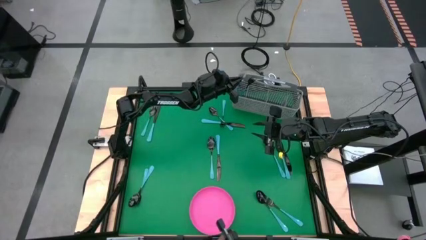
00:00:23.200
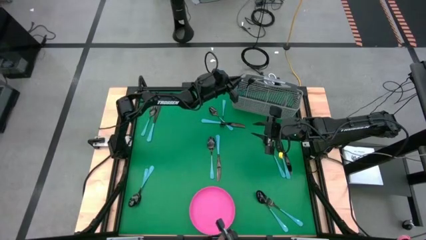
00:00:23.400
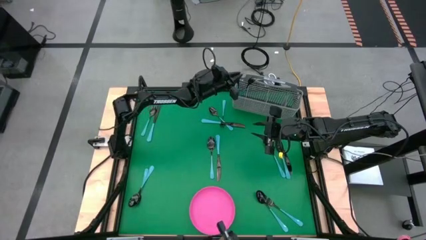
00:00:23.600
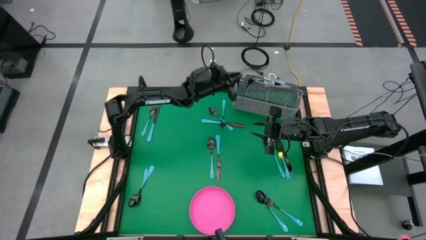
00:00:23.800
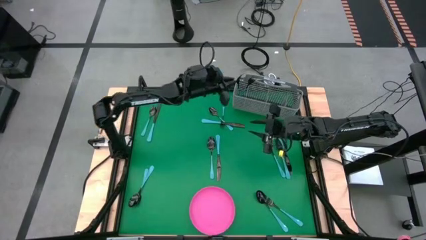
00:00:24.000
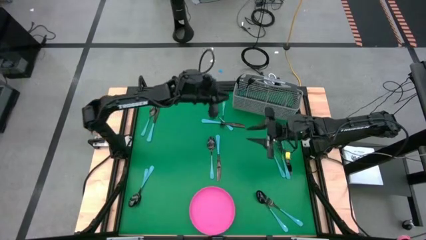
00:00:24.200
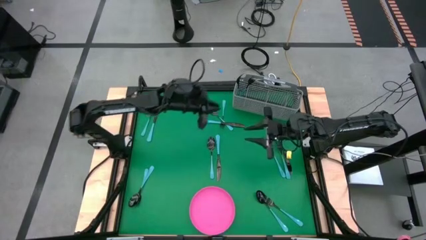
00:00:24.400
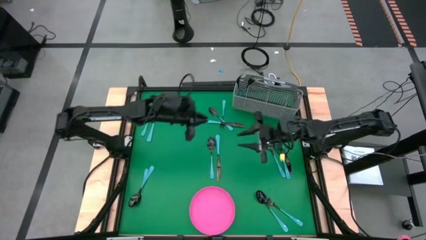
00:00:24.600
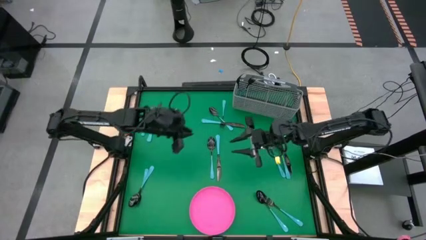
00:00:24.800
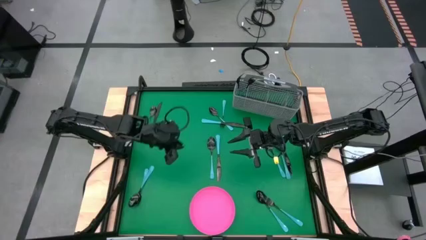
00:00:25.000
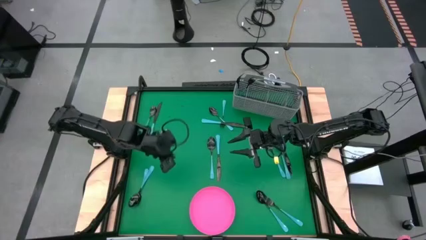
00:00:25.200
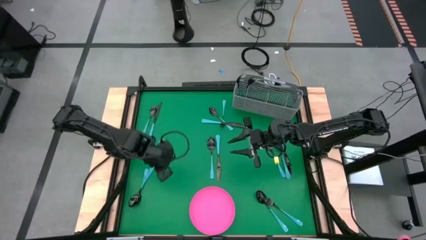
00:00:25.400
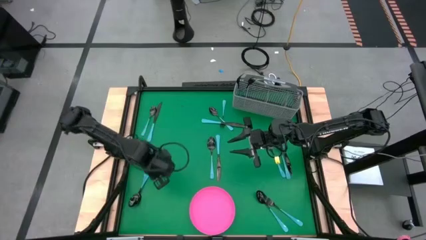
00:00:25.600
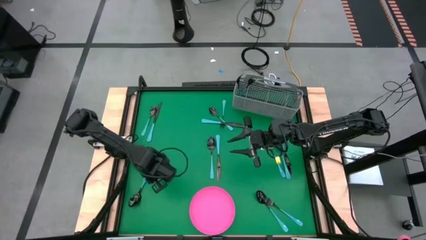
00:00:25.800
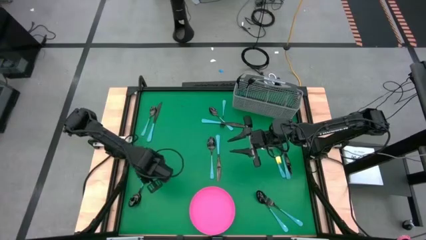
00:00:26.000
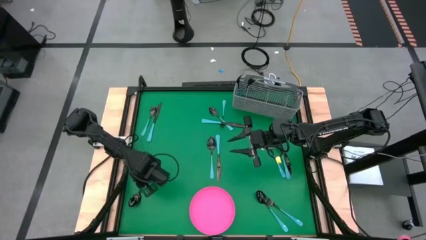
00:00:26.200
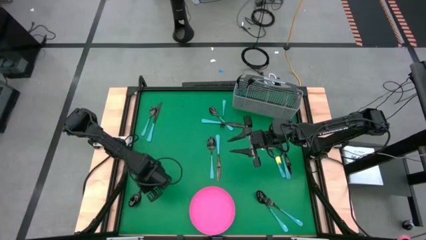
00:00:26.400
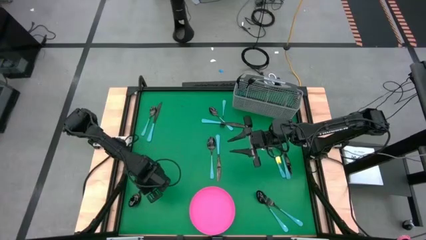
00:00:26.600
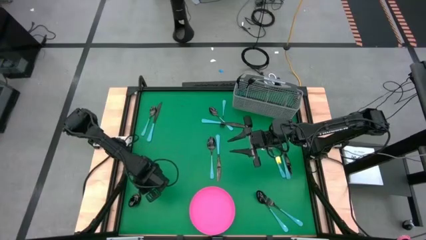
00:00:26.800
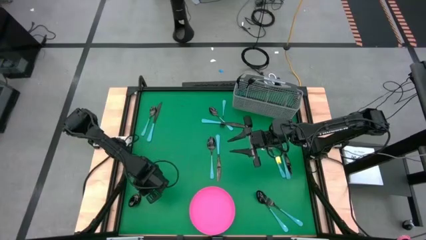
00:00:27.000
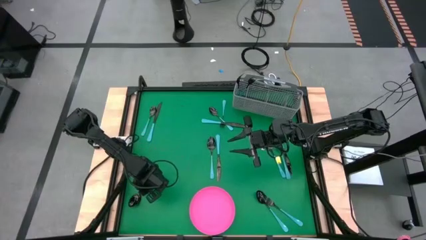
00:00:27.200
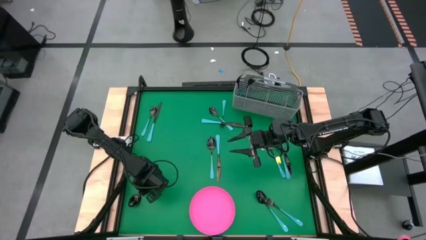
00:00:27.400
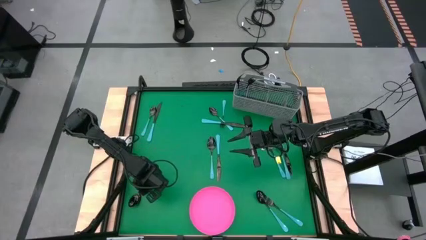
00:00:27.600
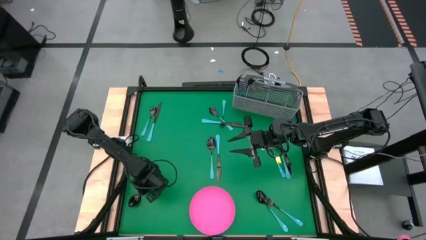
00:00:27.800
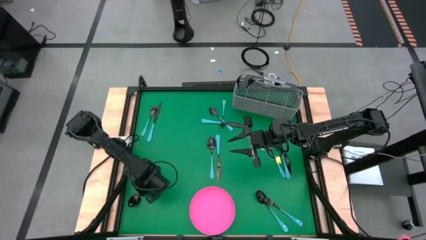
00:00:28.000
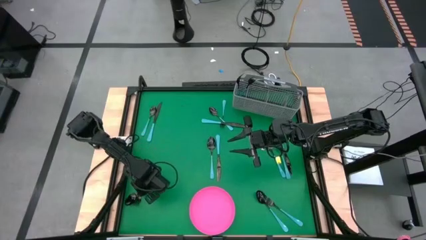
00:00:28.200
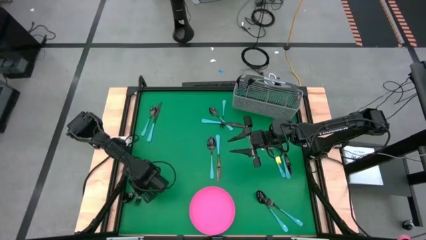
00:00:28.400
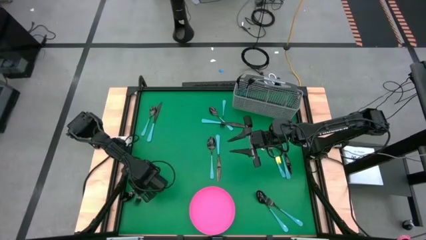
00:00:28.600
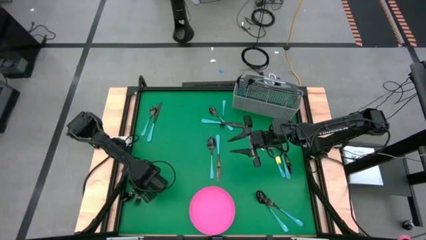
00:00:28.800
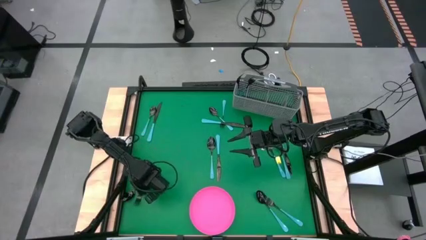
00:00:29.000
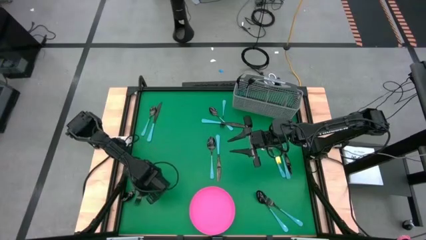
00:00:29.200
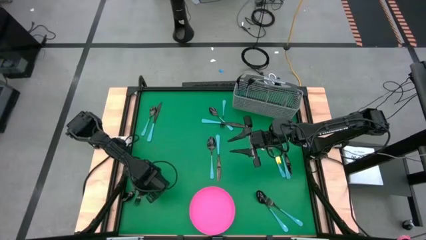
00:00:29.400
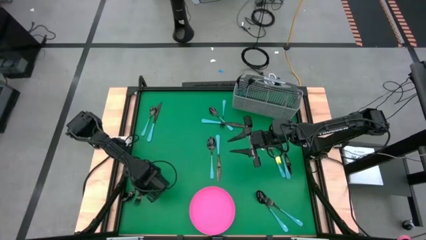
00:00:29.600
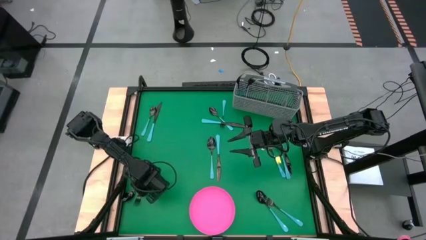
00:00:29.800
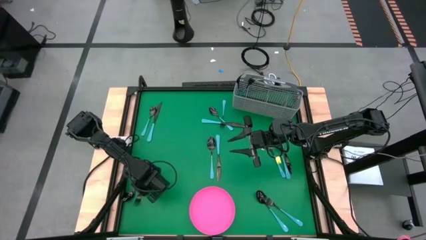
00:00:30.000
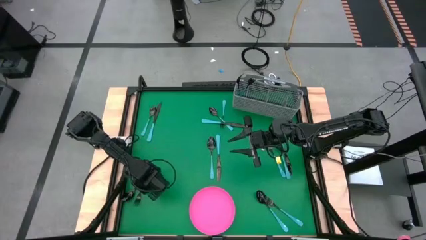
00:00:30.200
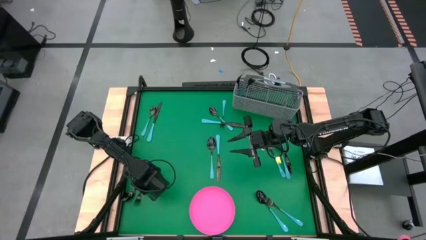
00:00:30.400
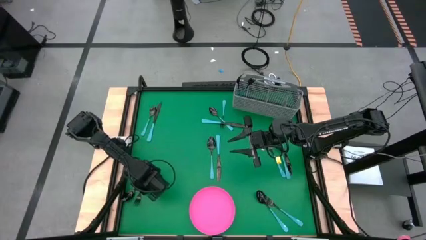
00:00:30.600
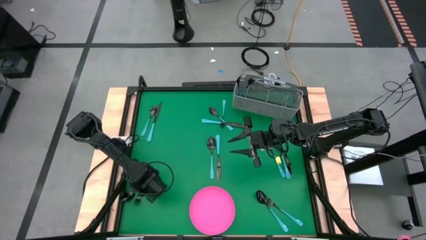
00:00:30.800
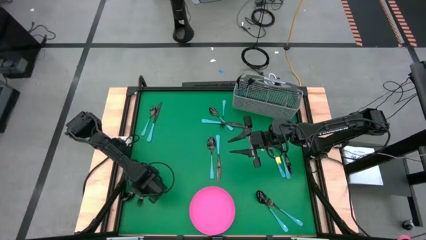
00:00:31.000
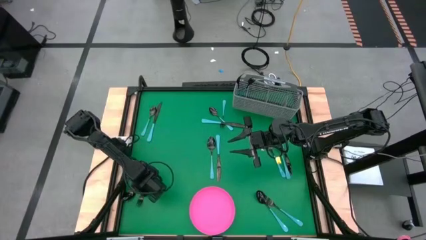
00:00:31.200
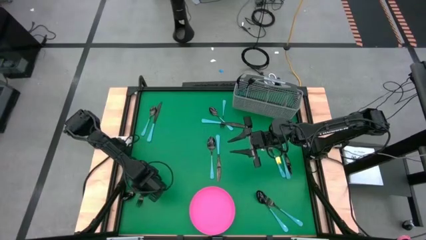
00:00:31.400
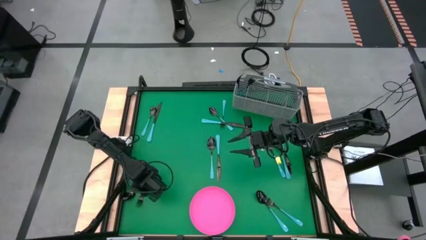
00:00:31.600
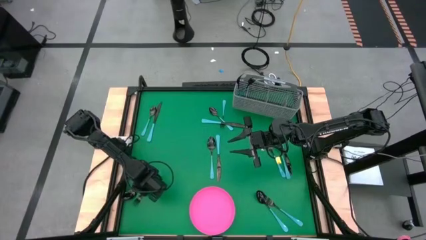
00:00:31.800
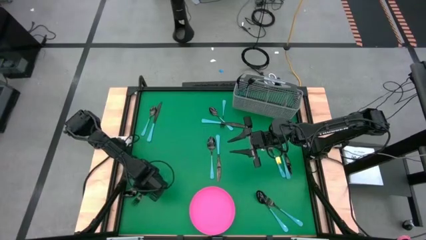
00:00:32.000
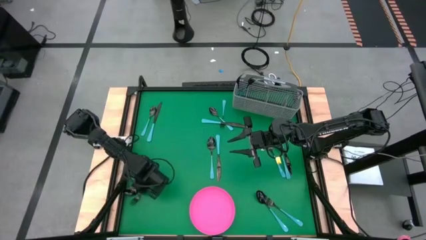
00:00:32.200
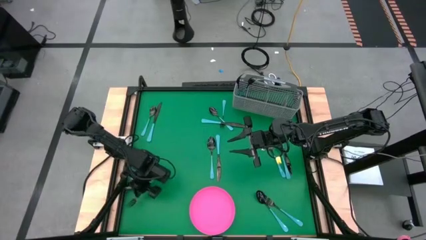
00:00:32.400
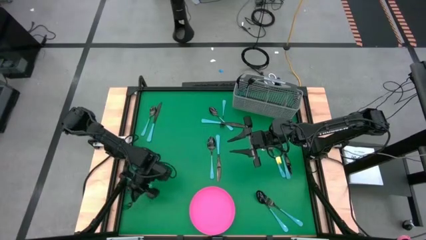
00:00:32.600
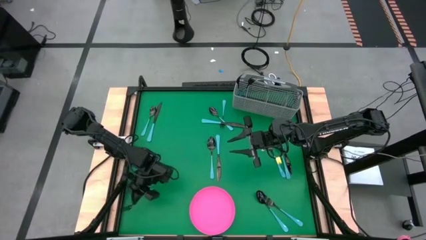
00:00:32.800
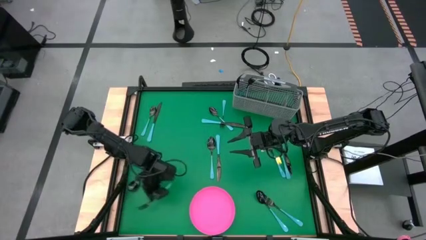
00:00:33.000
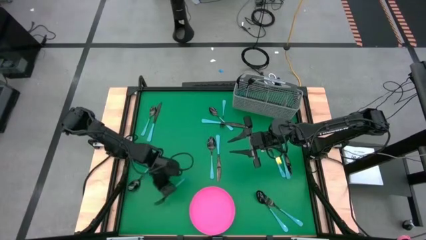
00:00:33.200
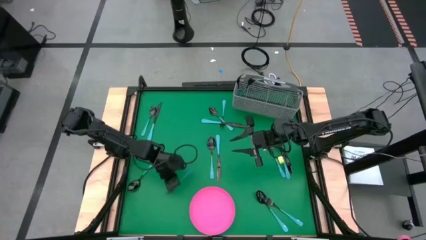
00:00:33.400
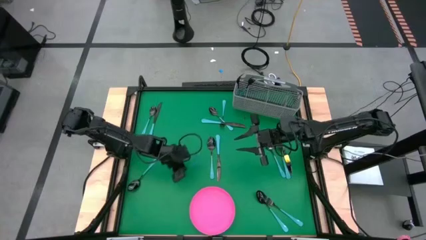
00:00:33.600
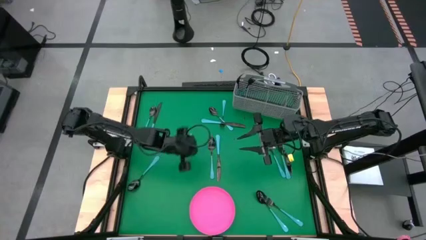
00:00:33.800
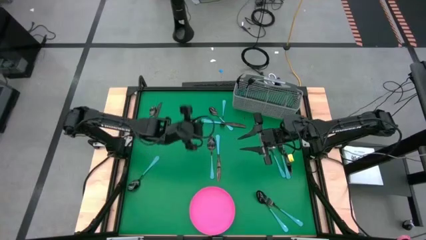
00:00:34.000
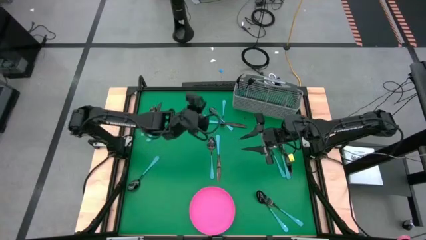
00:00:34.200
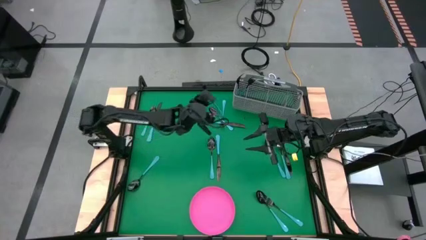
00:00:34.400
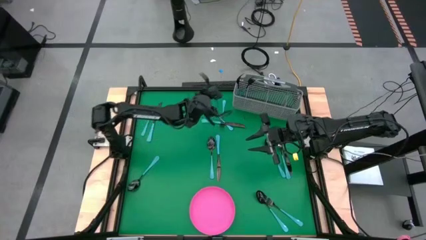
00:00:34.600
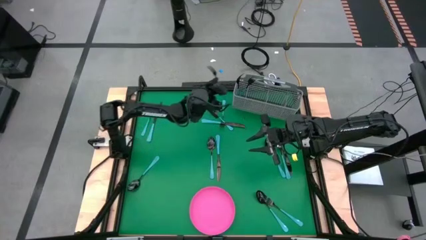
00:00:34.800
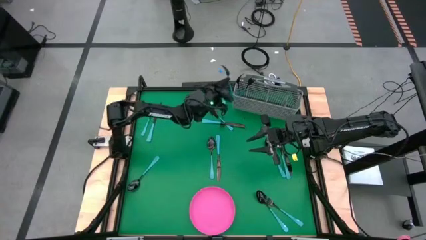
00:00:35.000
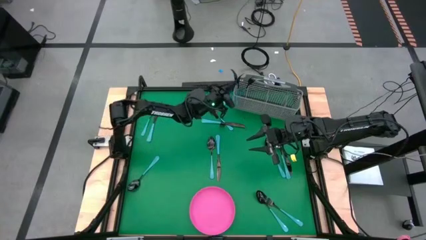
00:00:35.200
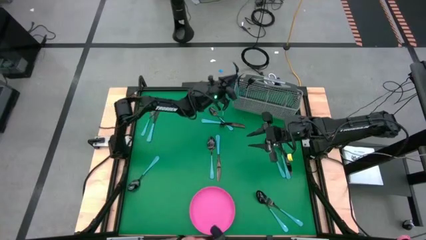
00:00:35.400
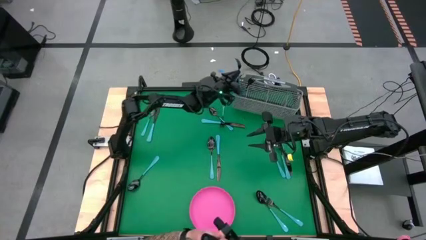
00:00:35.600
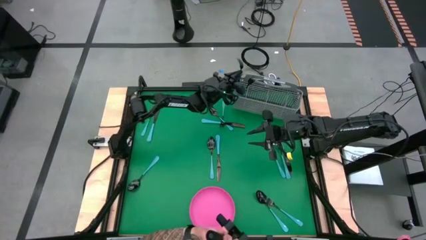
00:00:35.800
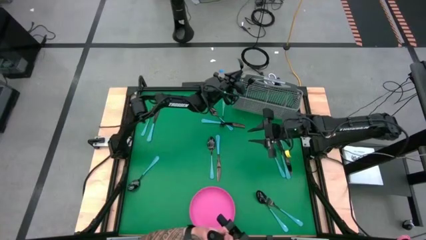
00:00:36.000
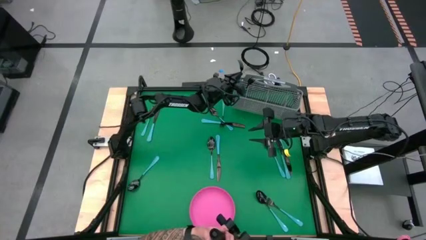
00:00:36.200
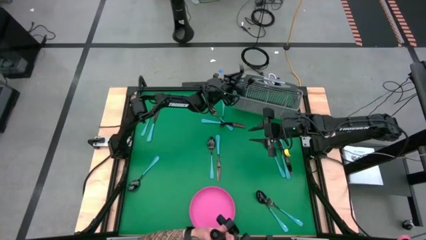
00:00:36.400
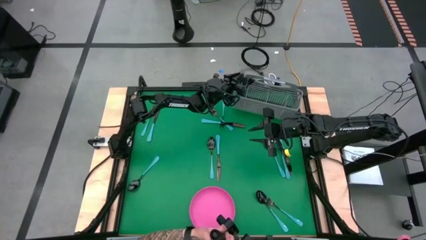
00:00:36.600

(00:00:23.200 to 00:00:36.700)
Task: Sort silverware
Put the blue fork into the utensil holder

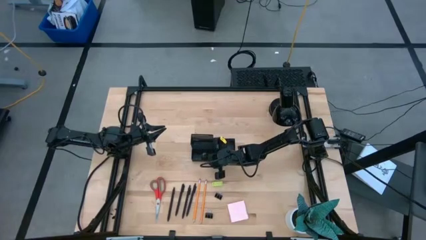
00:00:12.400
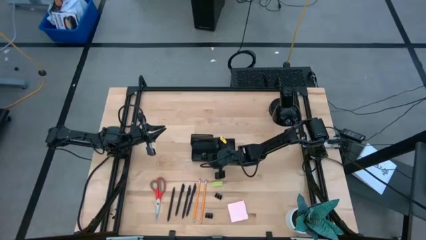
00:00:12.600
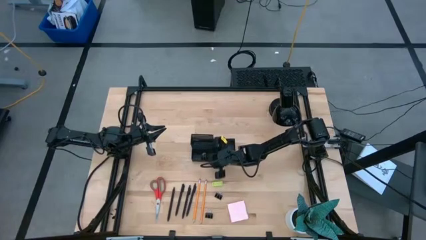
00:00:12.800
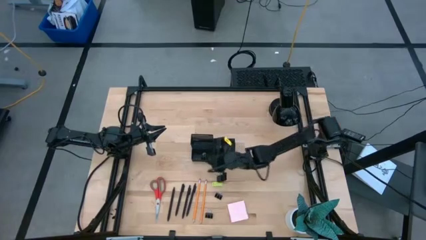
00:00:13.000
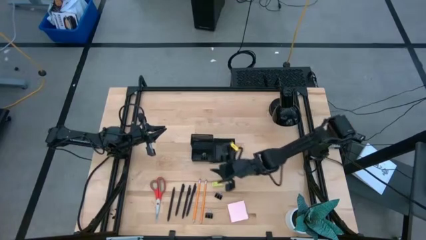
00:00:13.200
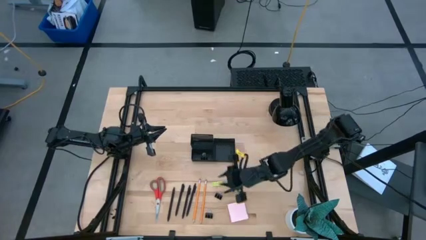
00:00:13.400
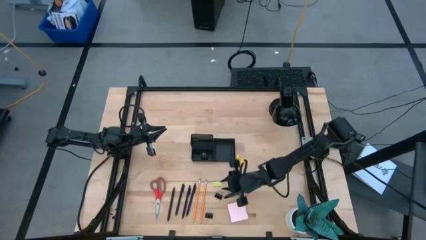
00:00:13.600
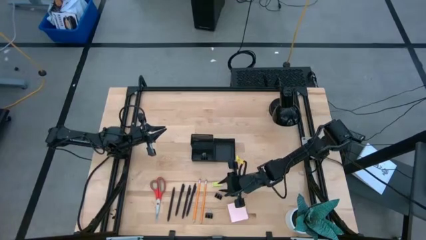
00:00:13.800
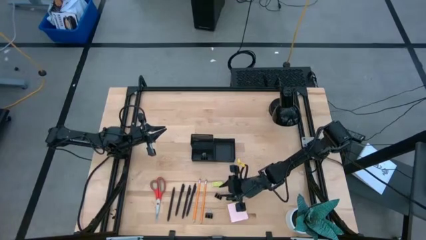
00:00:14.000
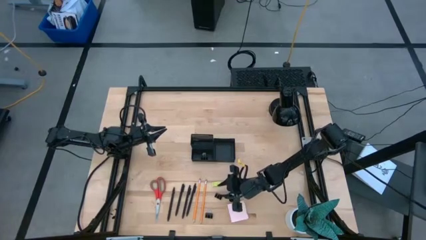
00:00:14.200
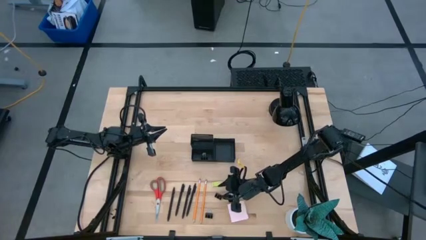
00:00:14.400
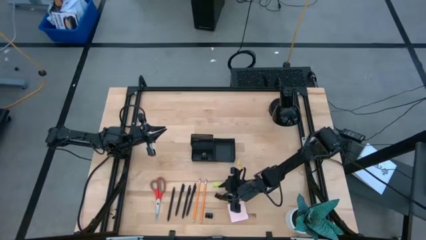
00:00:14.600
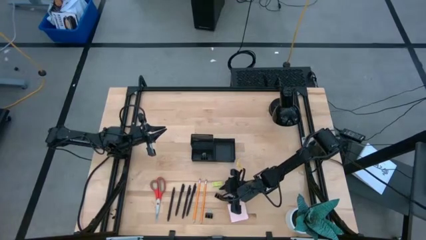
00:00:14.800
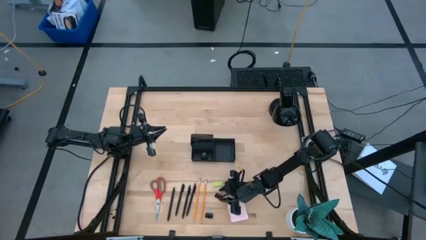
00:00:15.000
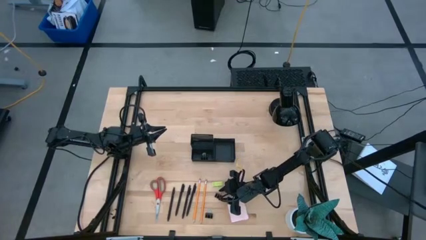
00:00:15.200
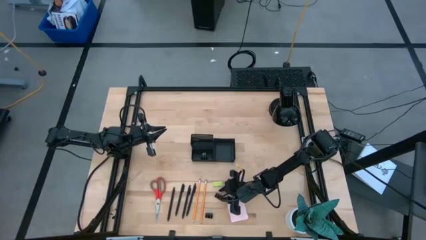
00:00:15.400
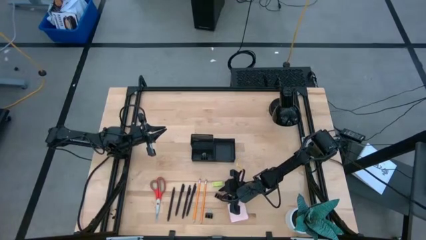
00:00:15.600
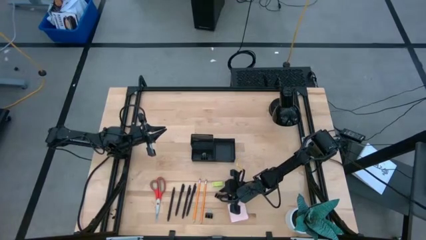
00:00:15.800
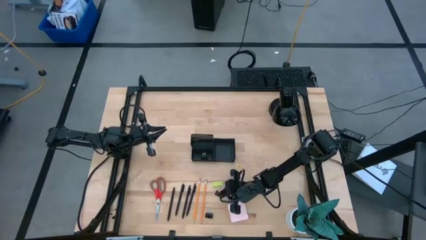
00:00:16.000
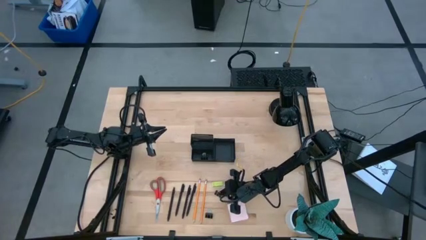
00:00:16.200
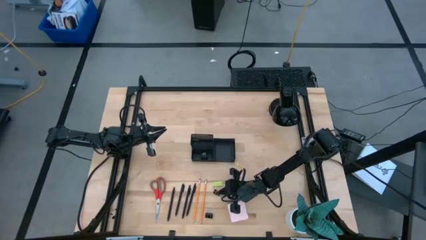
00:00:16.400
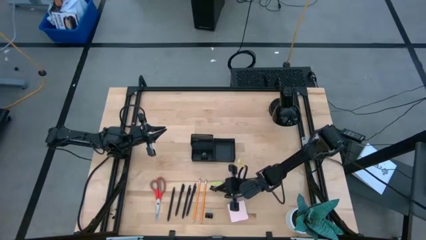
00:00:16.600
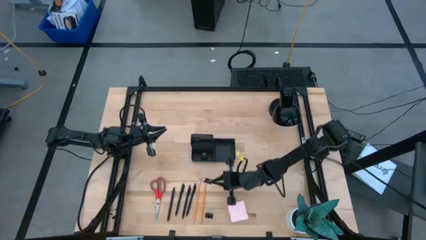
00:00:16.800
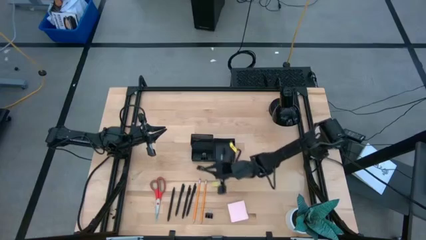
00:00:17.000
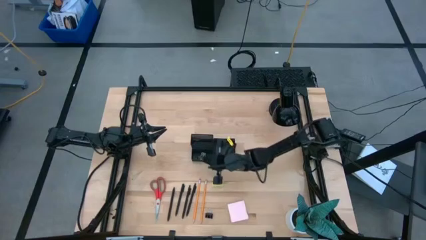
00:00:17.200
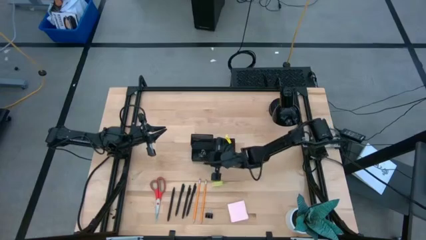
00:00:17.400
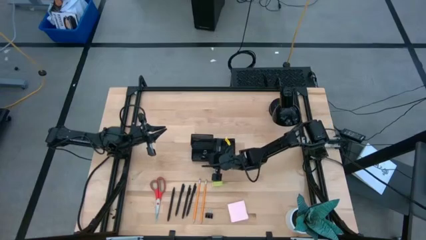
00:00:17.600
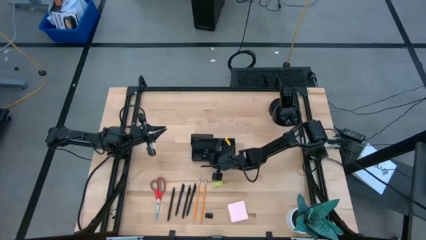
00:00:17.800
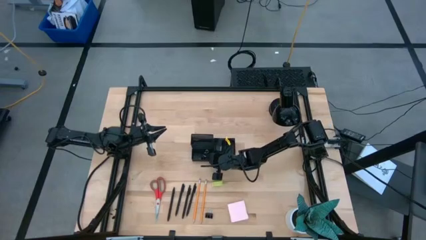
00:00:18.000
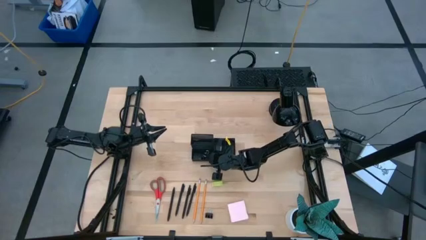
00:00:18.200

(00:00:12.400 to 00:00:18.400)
Task: Pick and place office supplies into organizer
Put the top black binder clip into the black desk organizer
